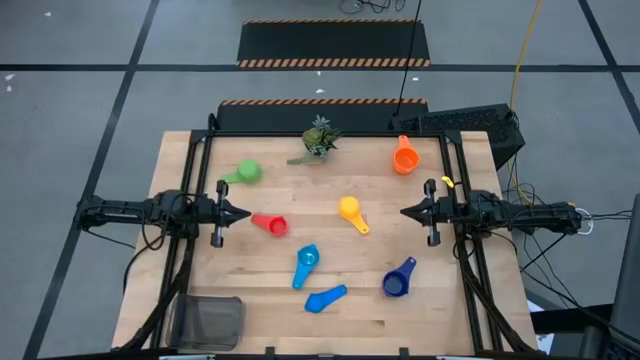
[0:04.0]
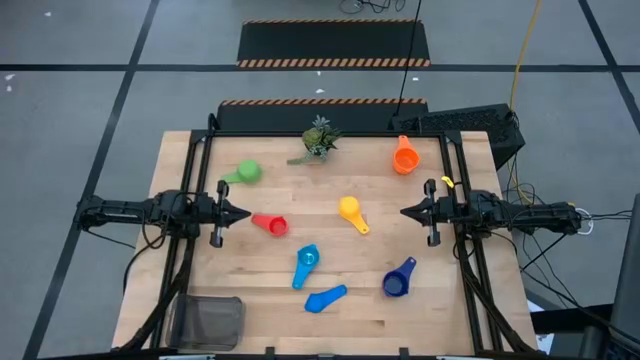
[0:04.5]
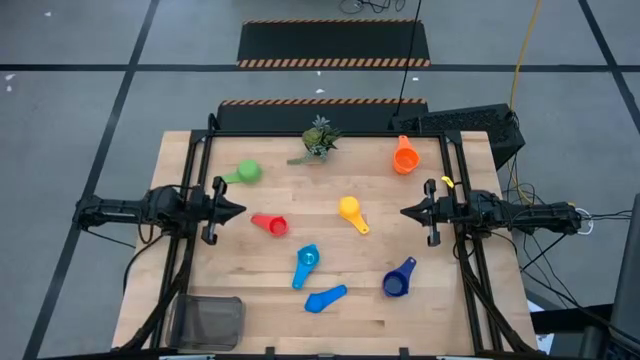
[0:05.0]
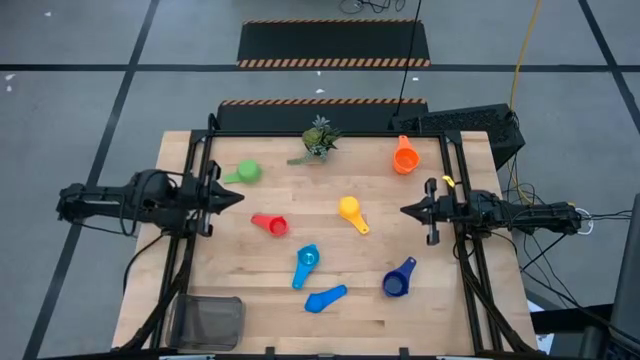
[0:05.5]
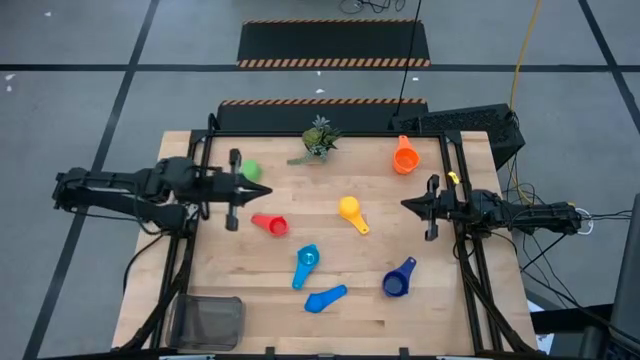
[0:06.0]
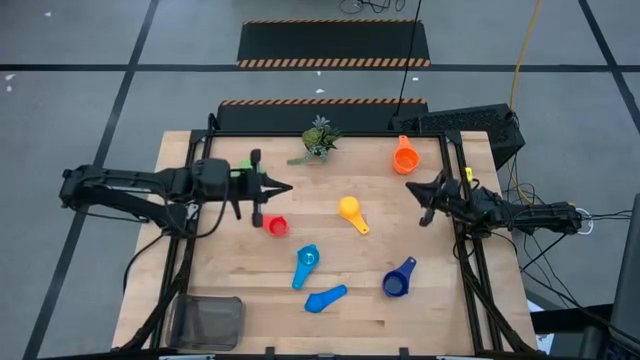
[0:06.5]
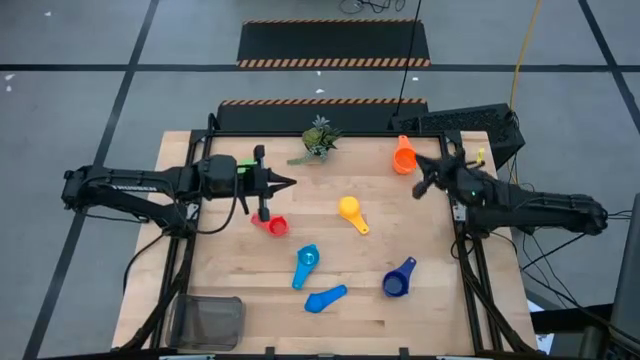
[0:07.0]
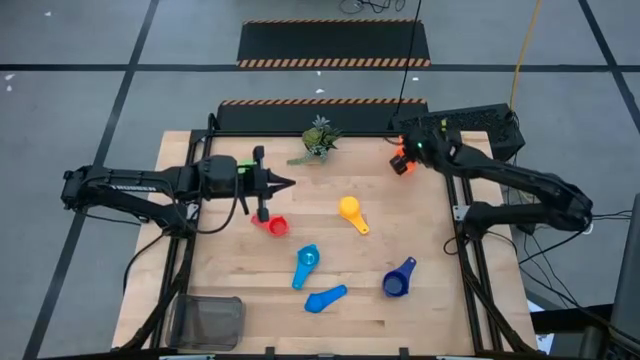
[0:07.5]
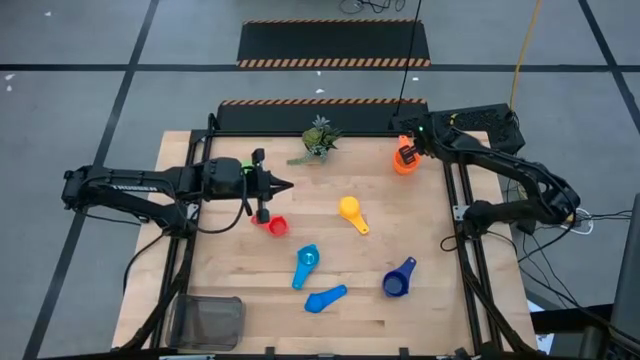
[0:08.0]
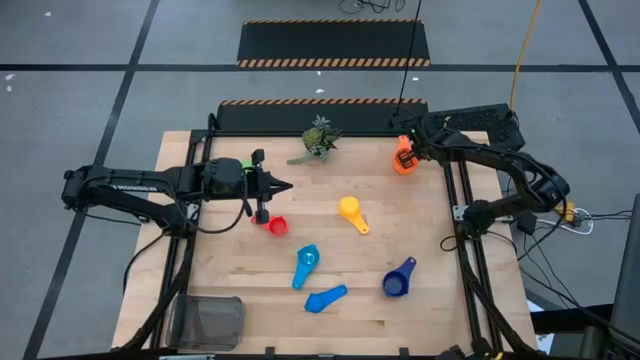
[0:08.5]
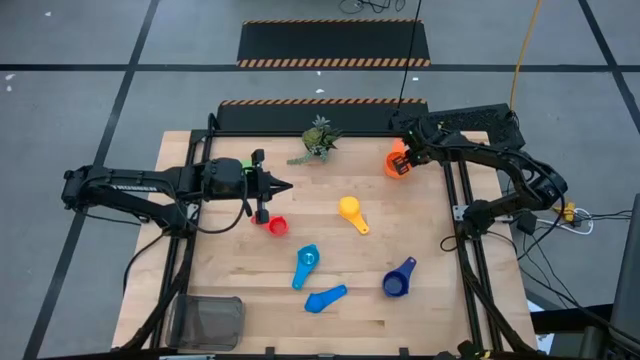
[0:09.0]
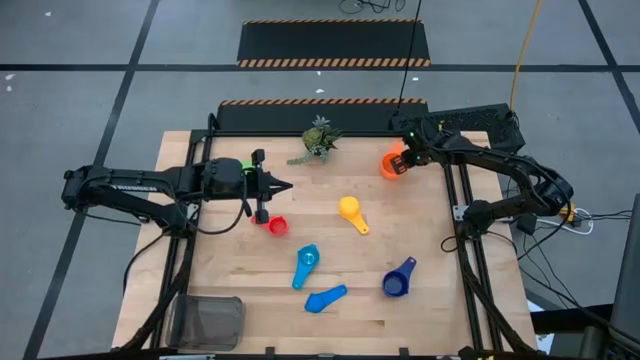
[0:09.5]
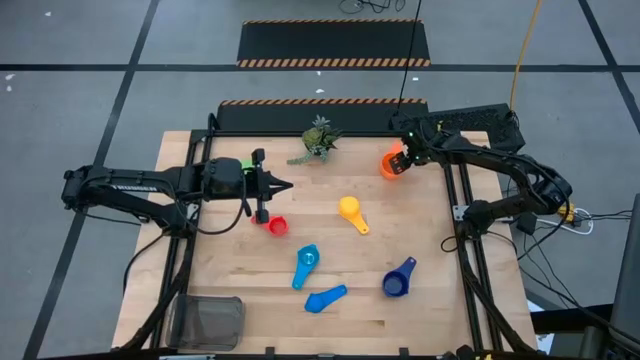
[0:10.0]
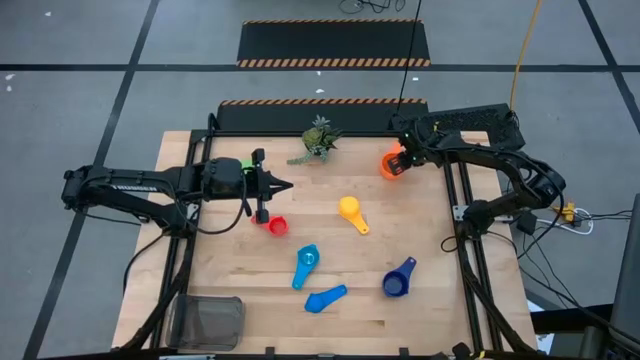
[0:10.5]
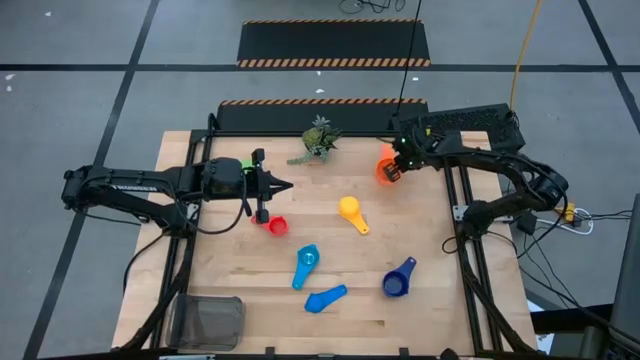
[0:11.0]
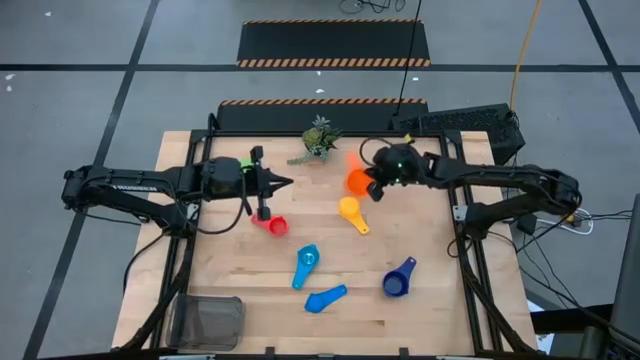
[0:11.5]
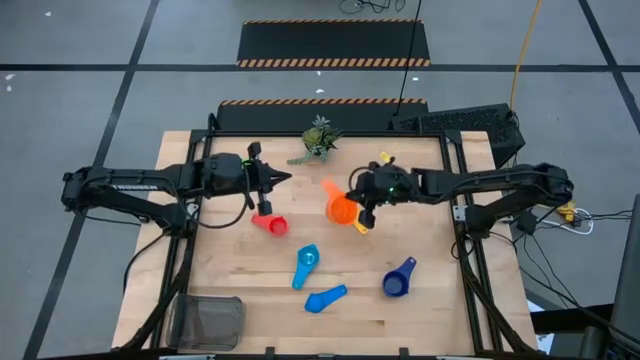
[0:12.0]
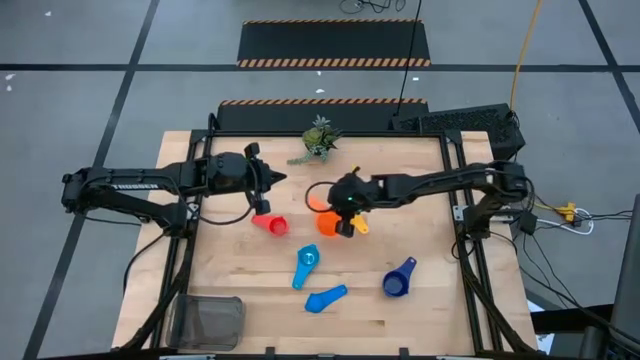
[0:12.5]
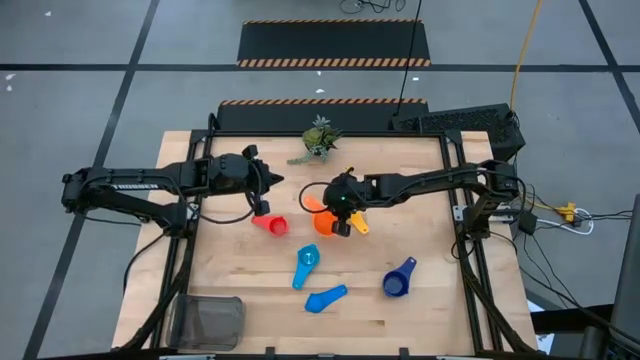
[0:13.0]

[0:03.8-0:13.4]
Task: Nest measuring cups in basket
Move the orange measuring cup to the center of the table

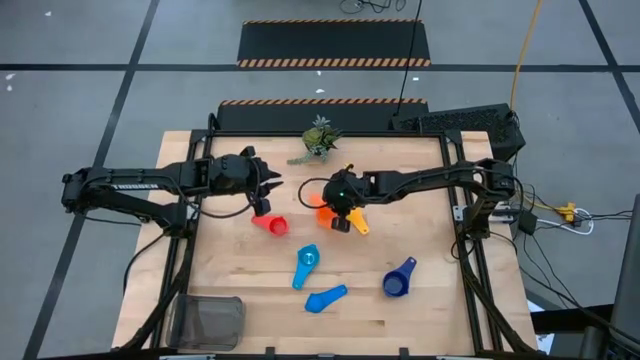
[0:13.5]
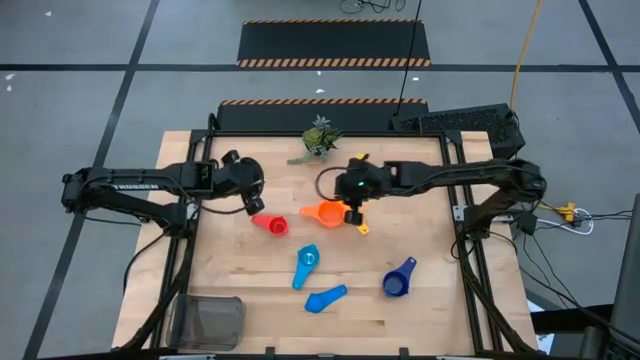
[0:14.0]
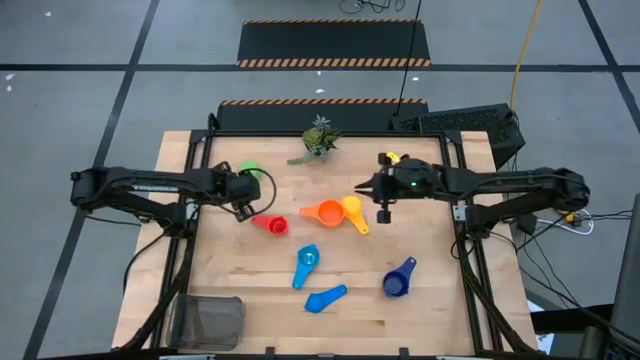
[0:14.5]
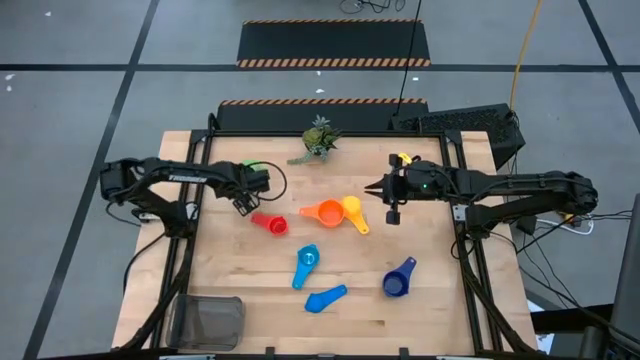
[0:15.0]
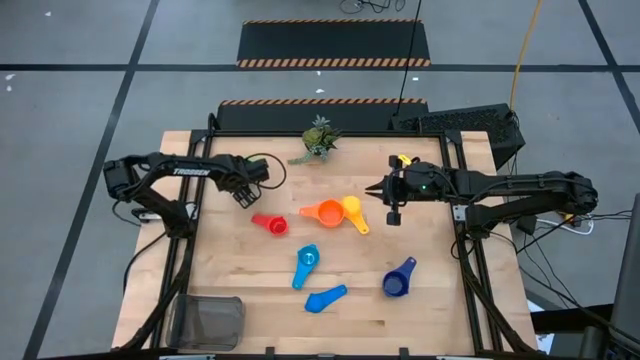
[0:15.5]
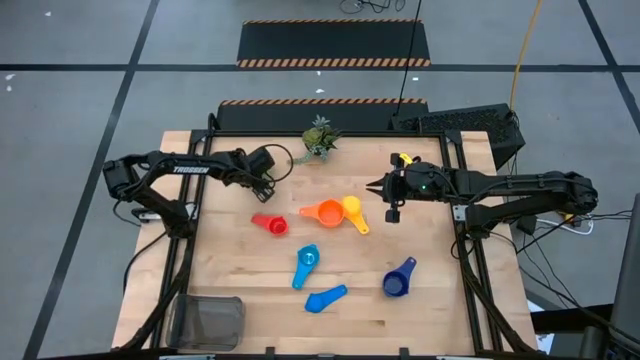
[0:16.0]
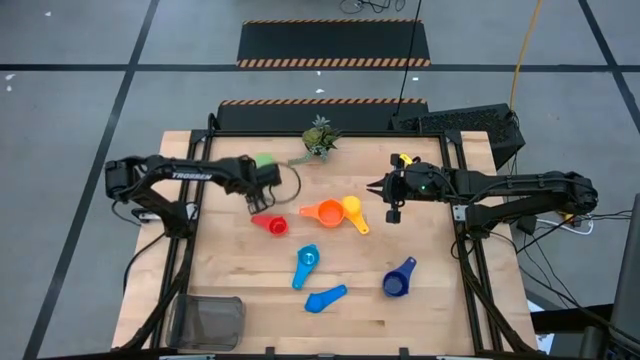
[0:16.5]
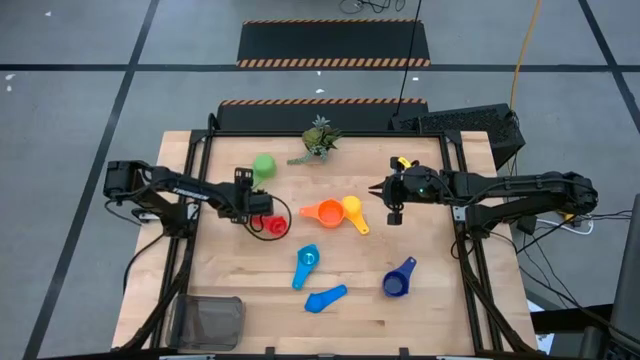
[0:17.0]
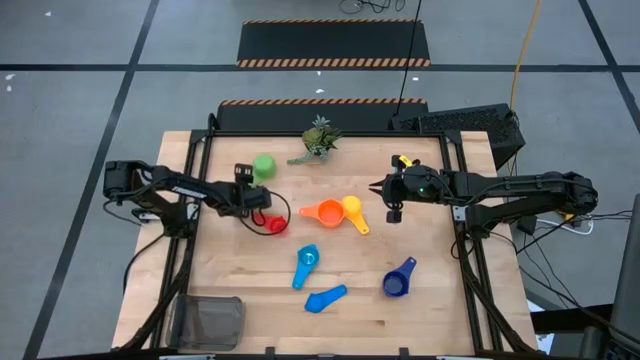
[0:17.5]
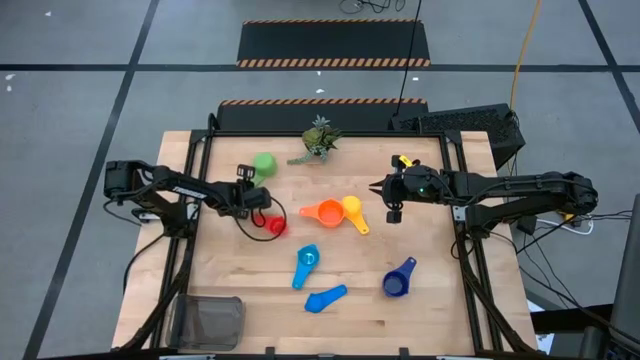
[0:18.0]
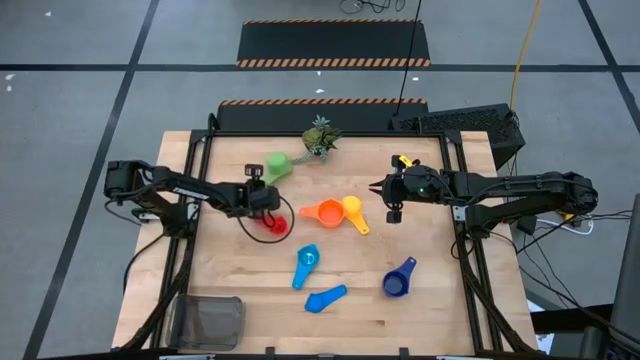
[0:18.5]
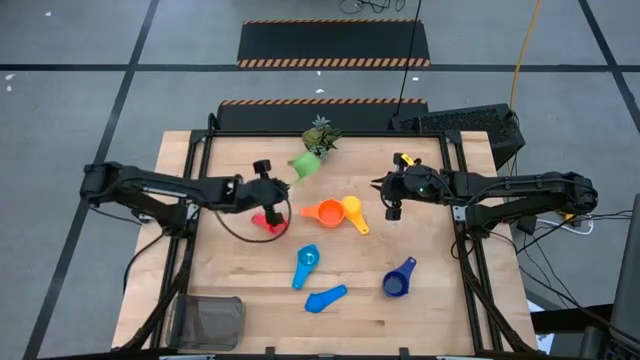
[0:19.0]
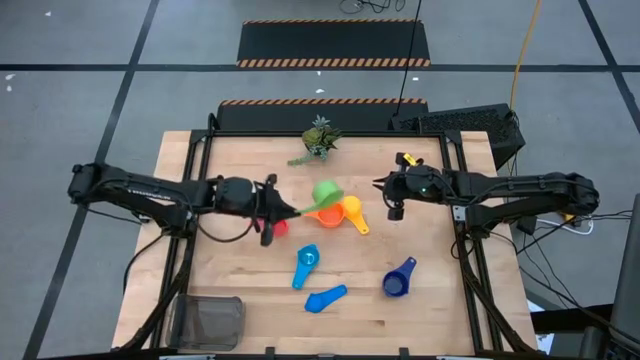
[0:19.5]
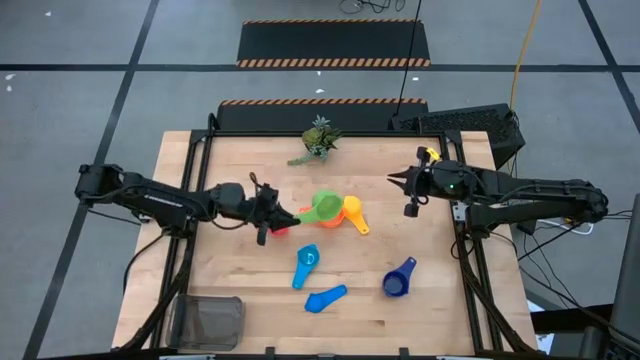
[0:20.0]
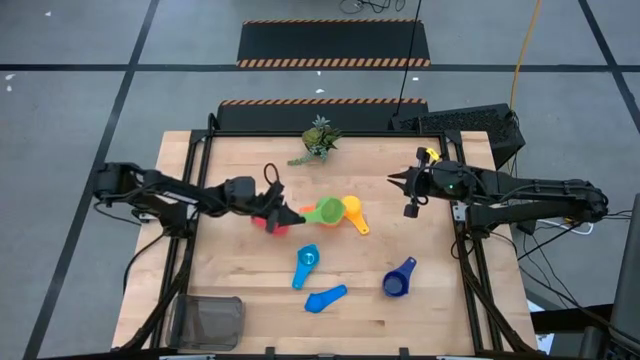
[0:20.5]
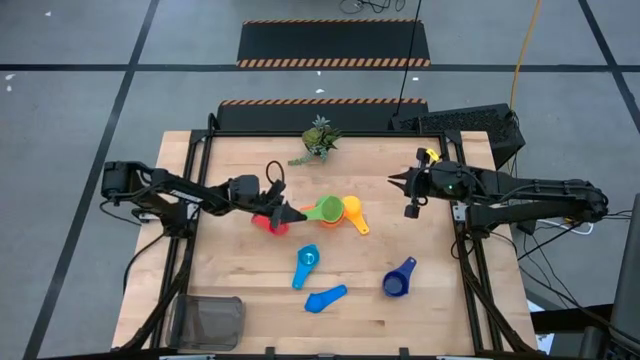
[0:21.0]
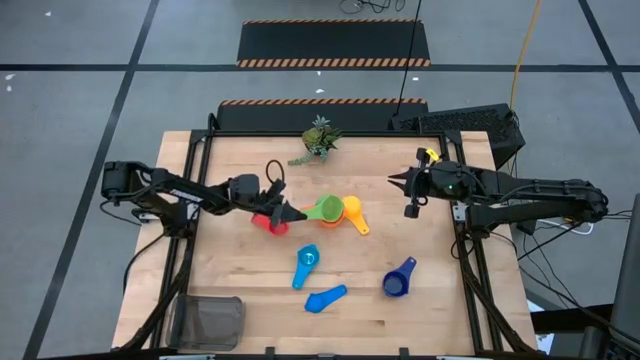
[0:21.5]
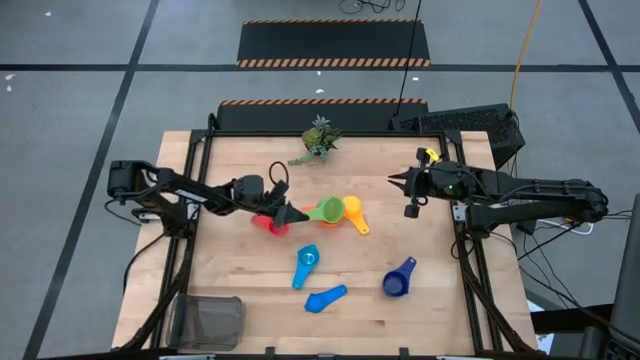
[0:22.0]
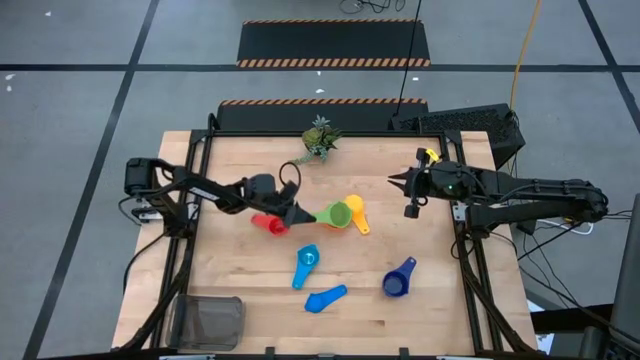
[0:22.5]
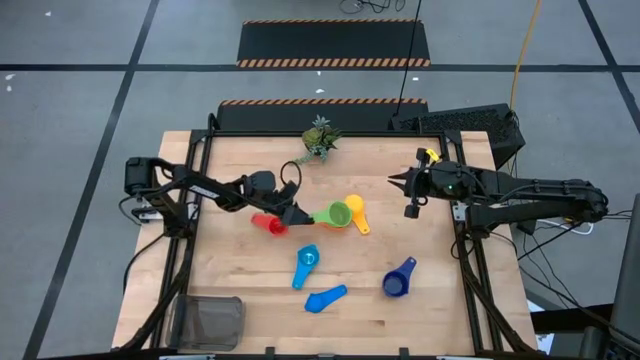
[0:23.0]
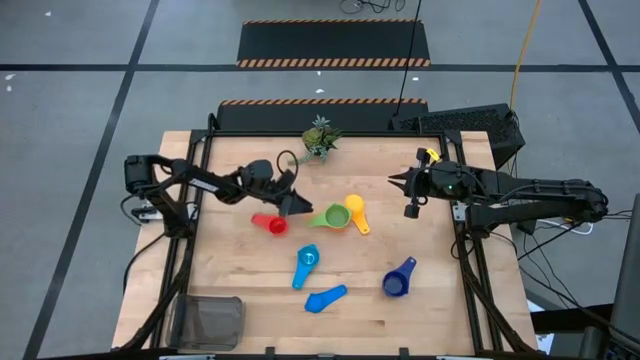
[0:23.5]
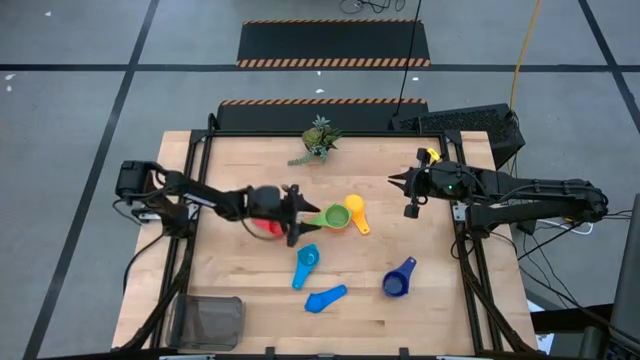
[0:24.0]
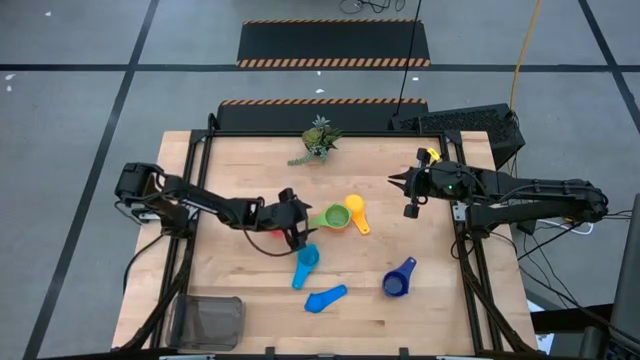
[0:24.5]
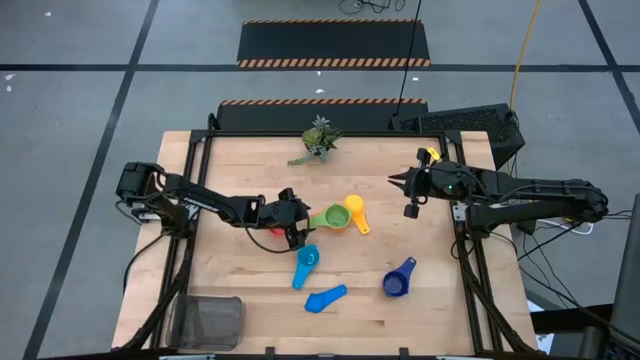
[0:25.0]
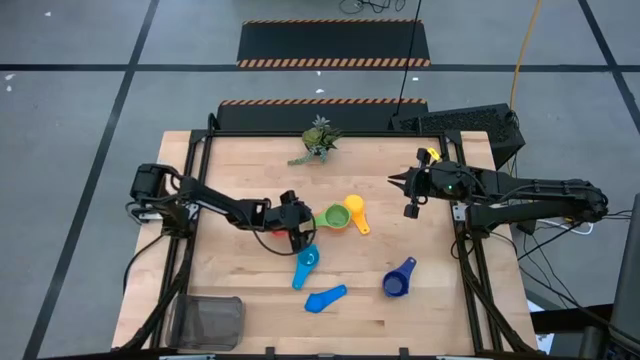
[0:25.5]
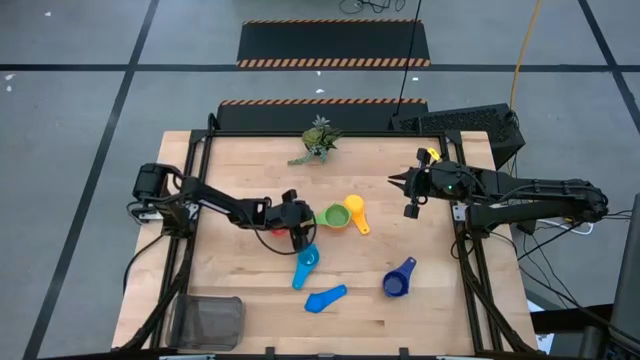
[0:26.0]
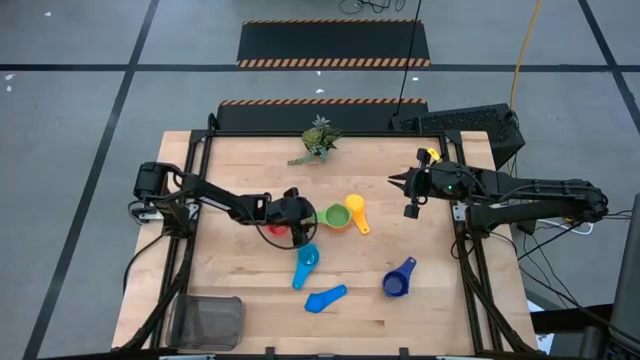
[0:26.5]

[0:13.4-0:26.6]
Stack the green measuring cup on top of the orange measuring cup
